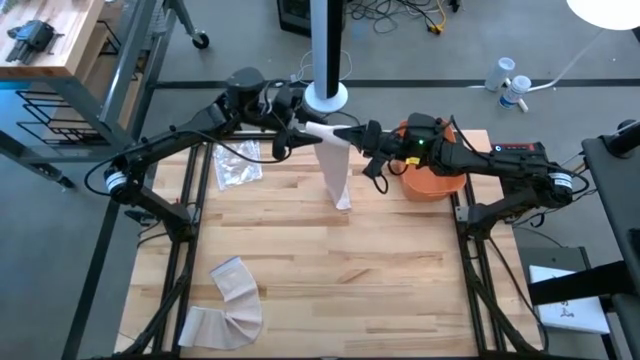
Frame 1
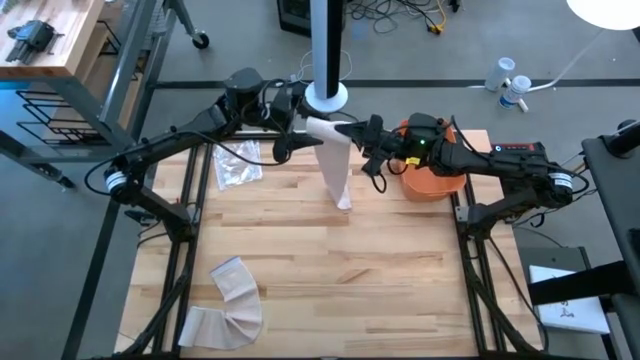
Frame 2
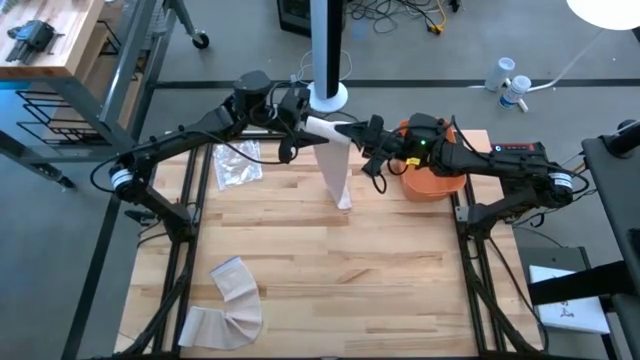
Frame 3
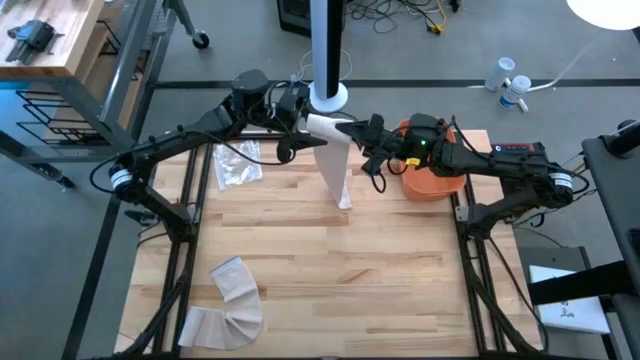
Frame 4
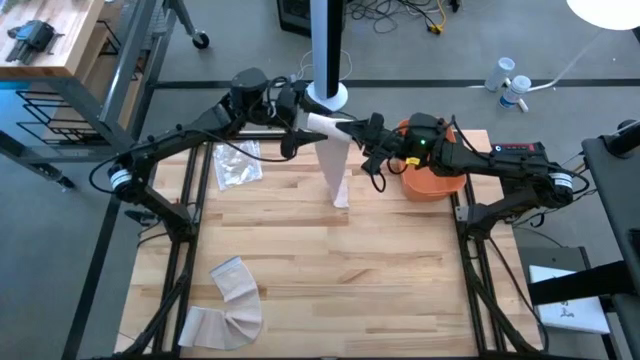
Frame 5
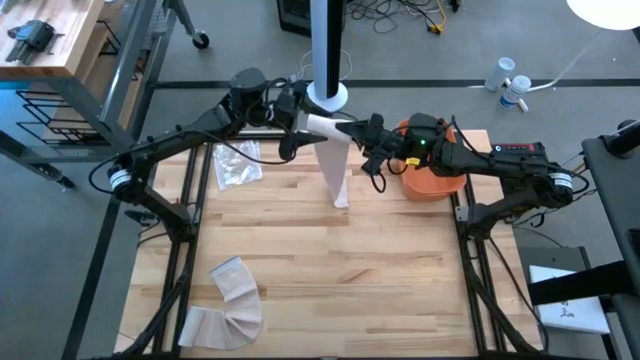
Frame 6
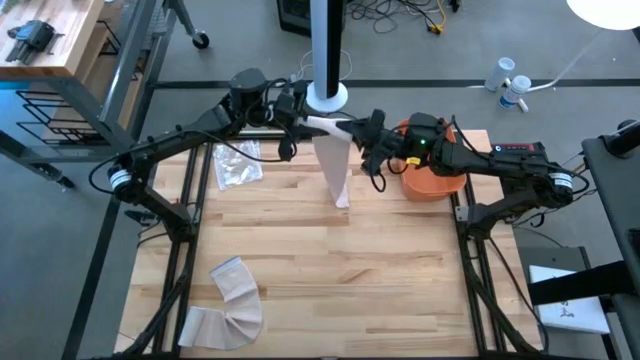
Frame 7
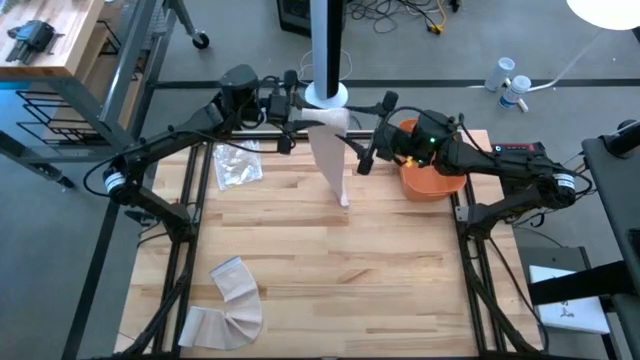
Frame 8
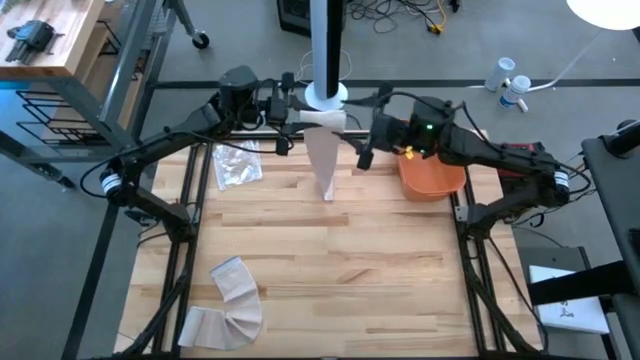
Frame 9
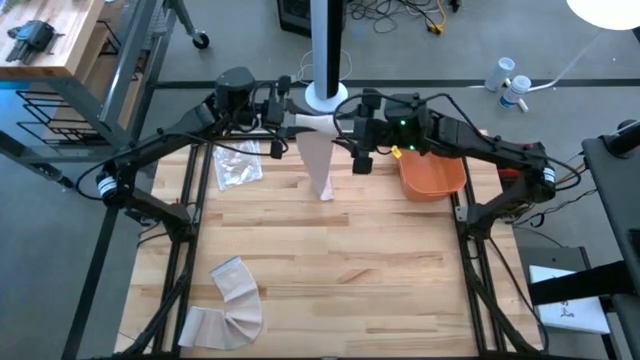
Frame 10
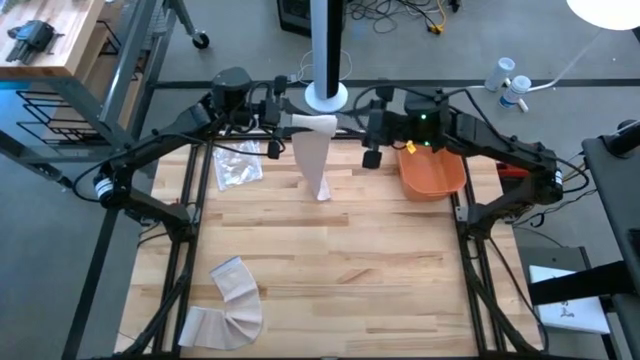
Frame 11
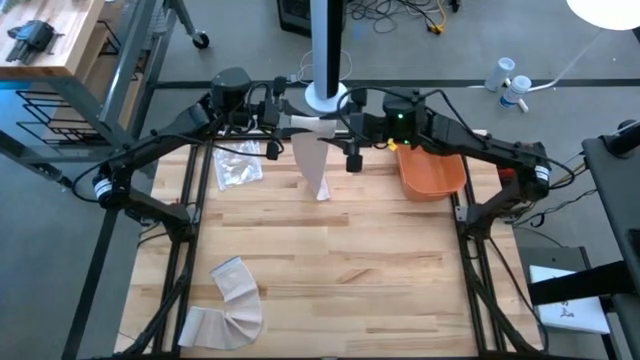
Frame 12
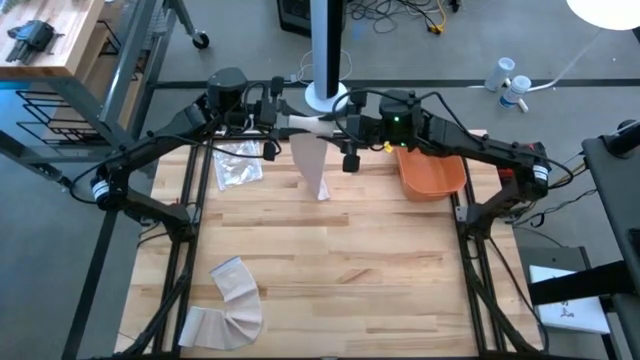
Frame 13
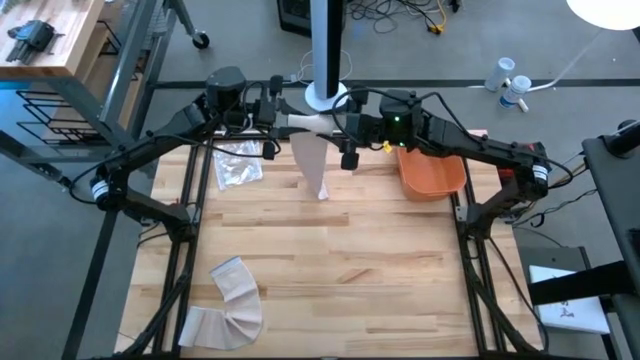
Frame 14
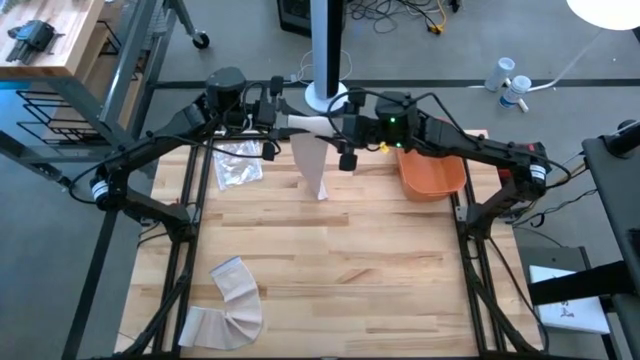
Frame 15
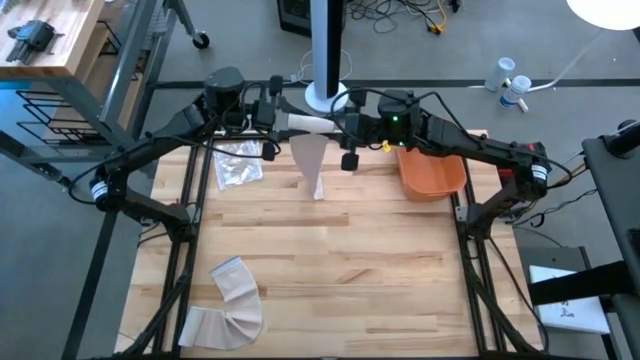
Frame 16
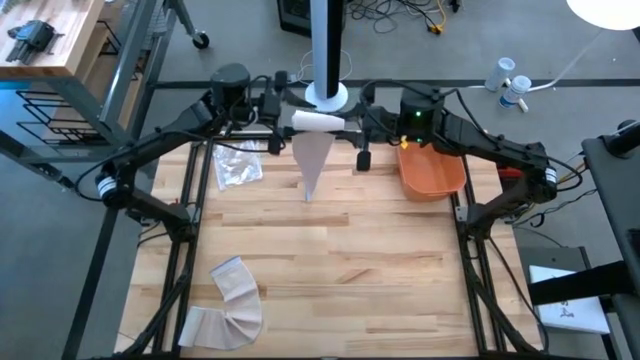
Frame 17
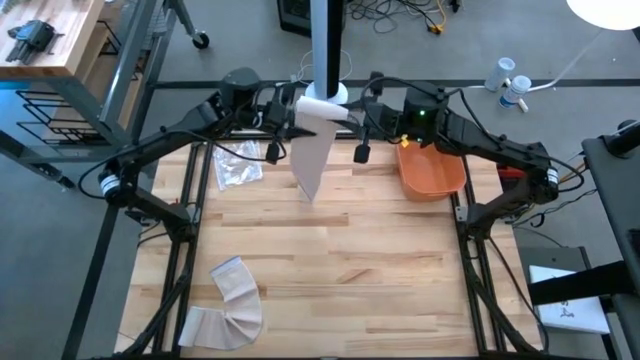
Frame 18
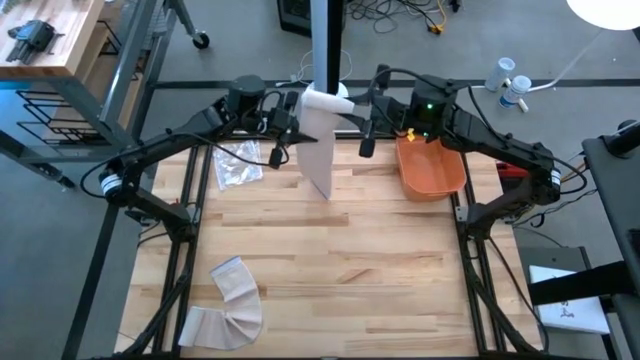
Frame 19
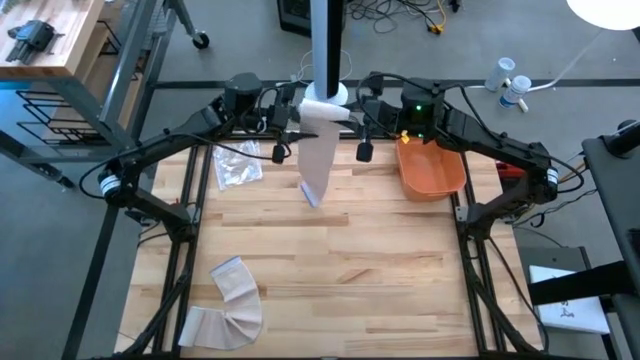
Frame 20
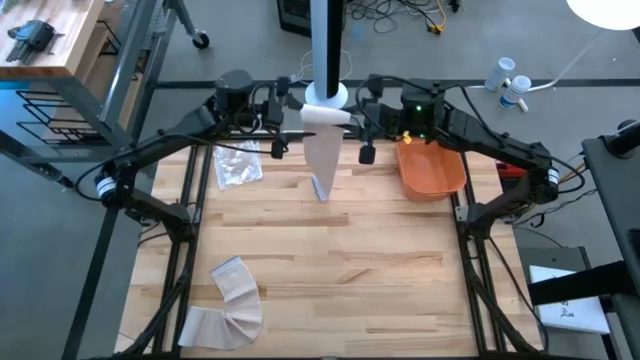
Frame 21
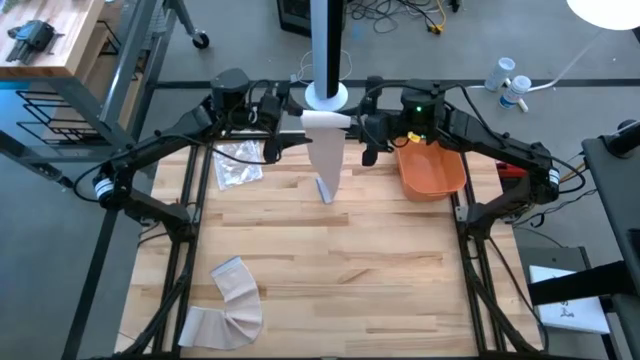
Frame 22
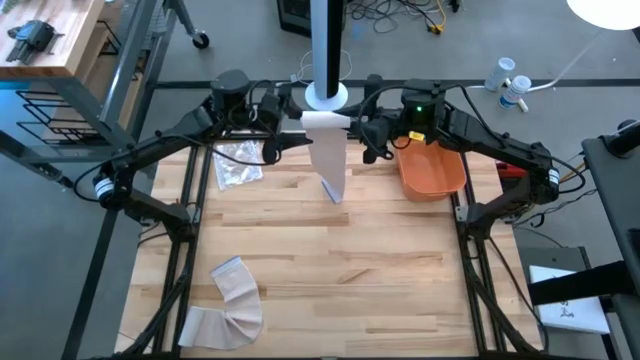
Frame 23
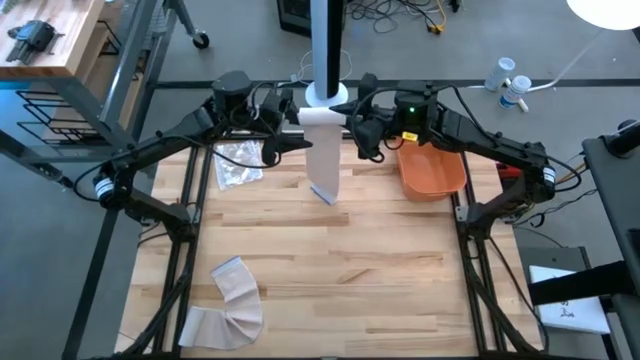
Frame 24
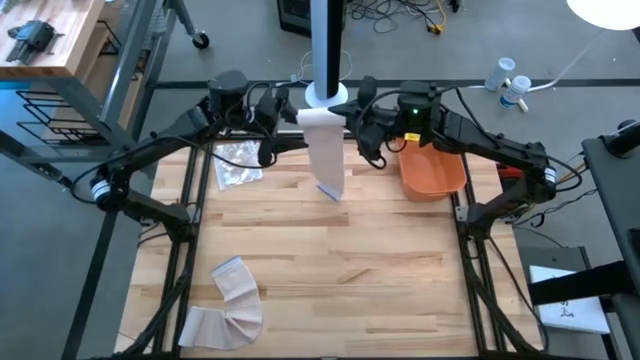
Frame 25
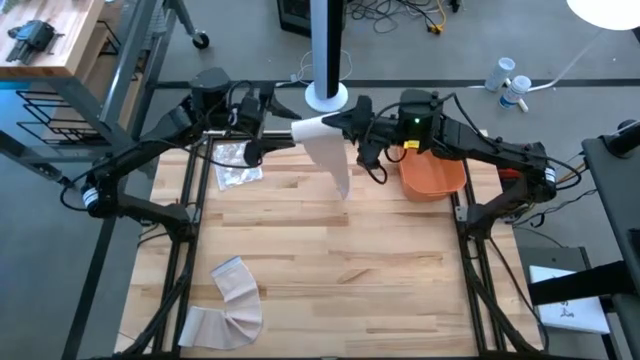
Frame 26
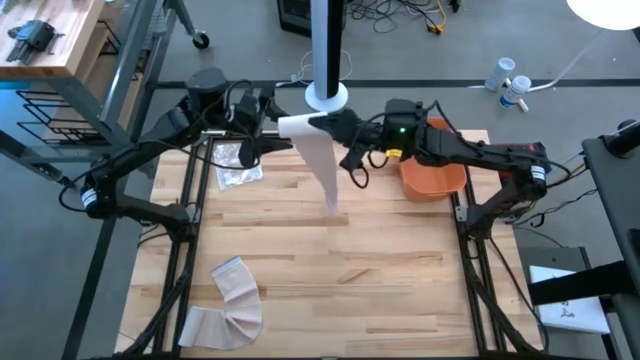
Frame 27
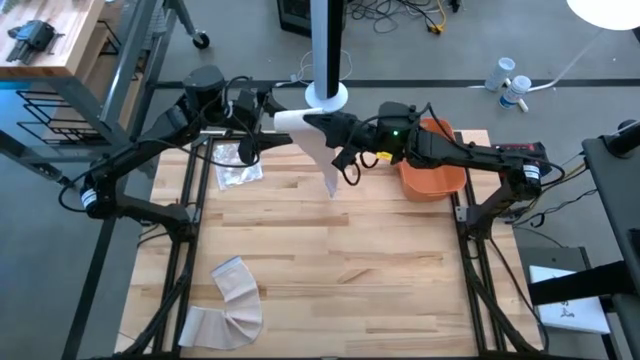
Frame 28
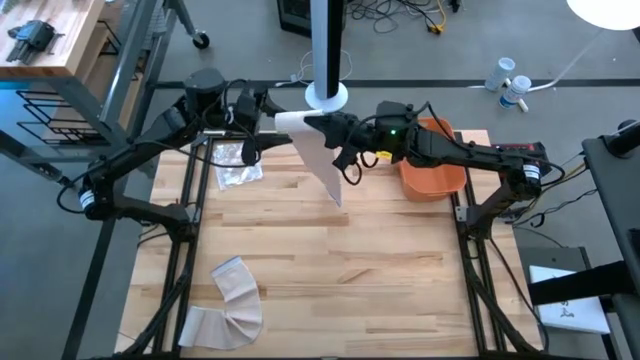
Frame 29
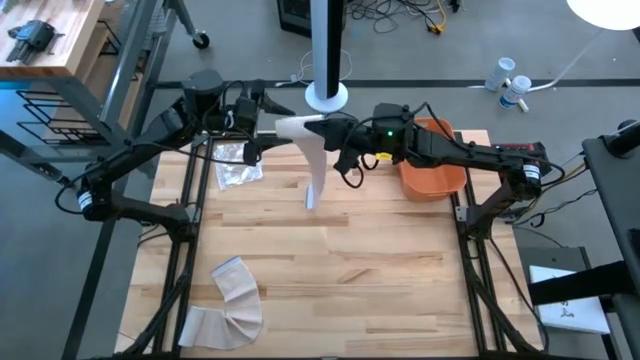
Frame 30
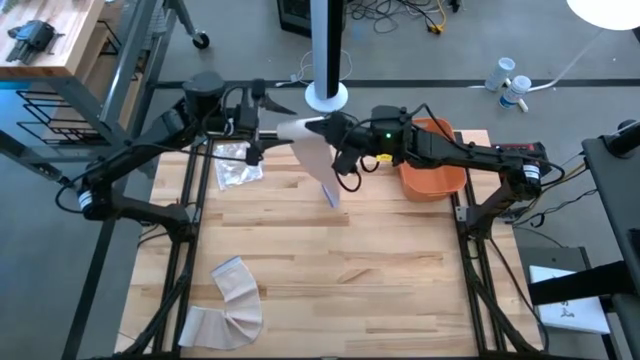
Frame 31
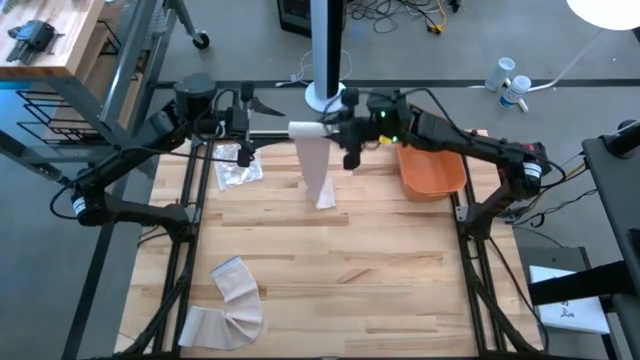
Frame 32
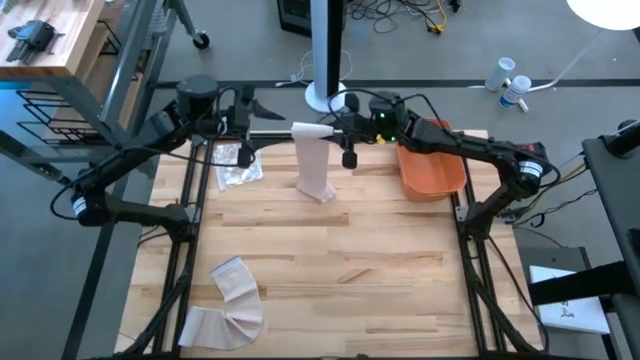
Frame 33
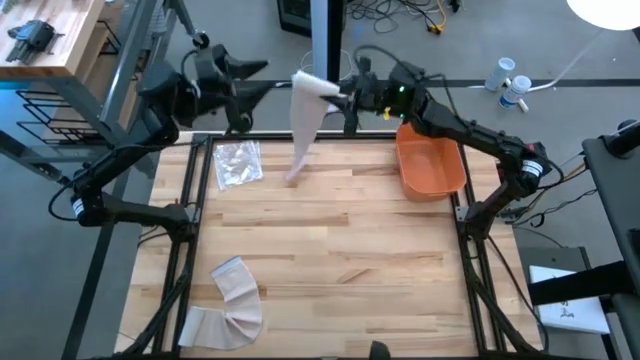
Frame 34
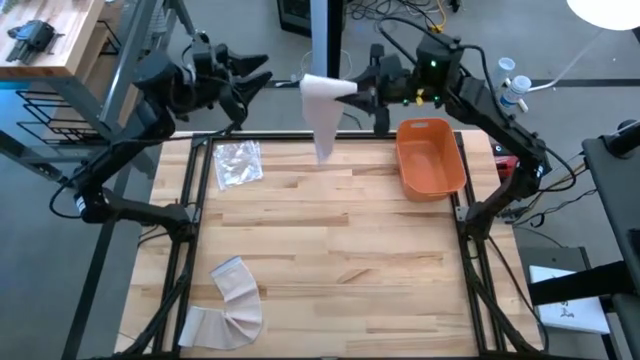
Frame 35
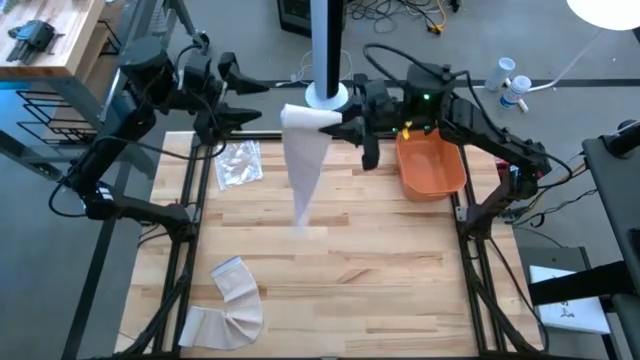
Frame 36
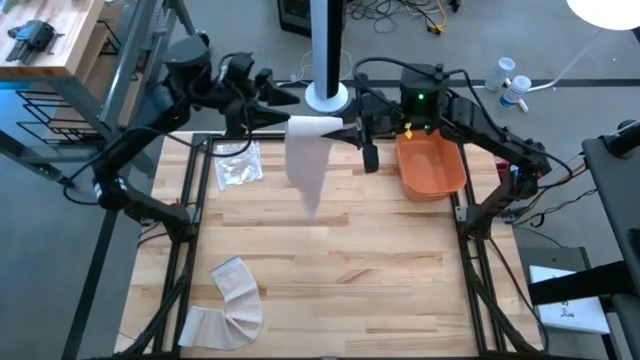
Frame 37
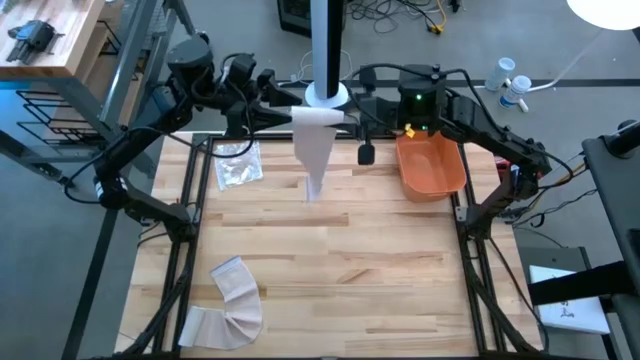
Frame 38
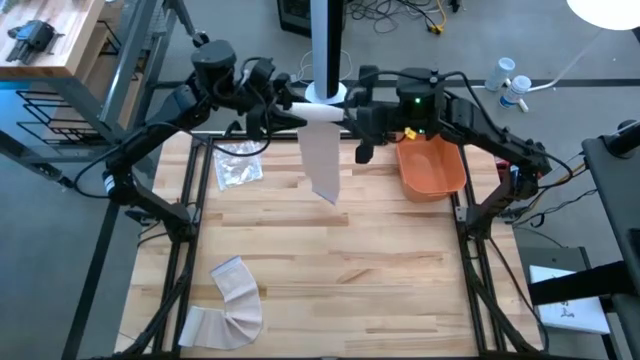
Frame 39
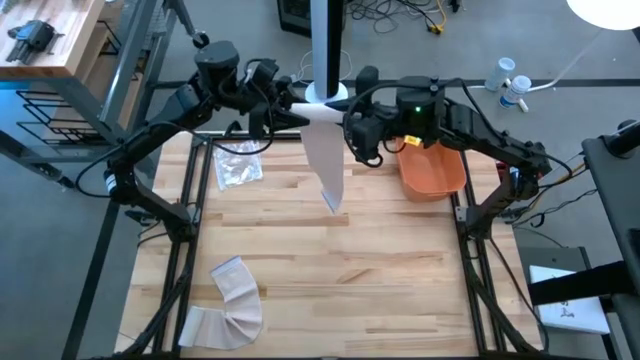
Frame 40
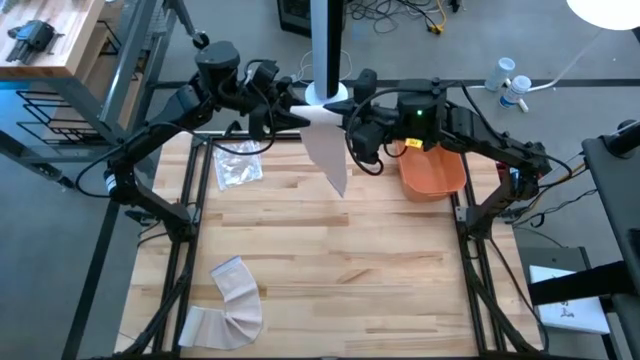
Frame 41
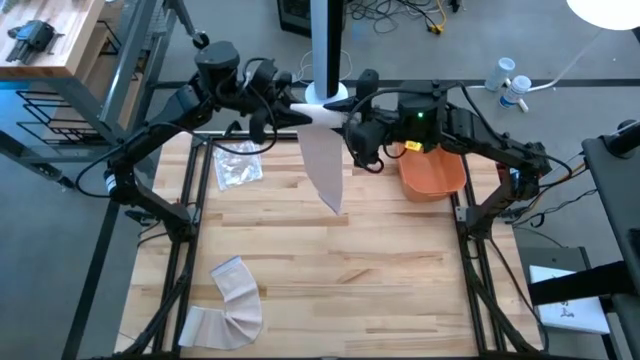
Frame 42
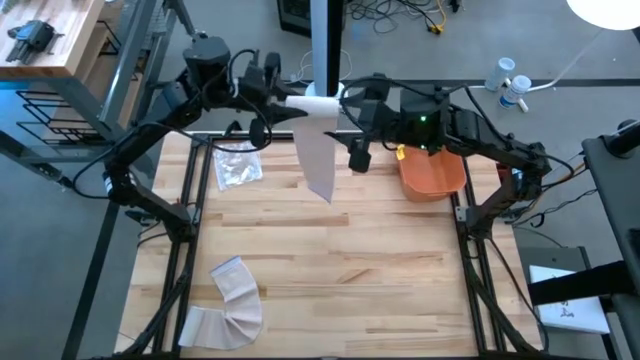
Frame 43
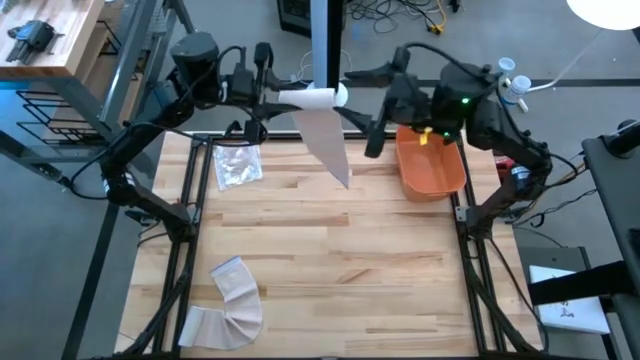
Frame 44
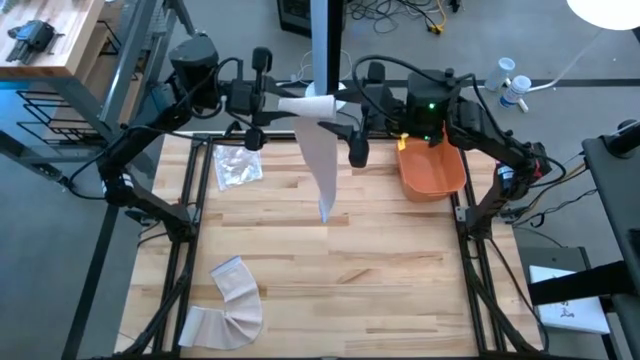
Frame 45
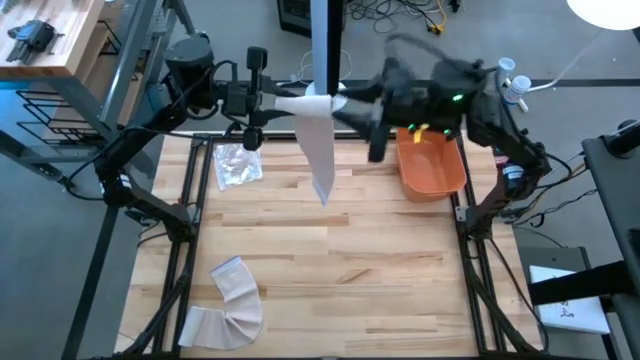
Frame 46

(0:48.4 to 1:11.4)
Task: Roll bandage
Roll the center brown bandage
